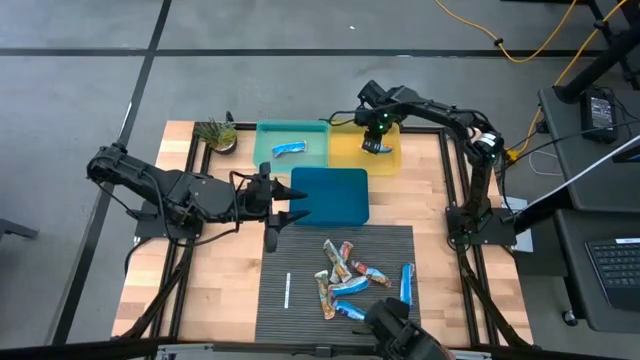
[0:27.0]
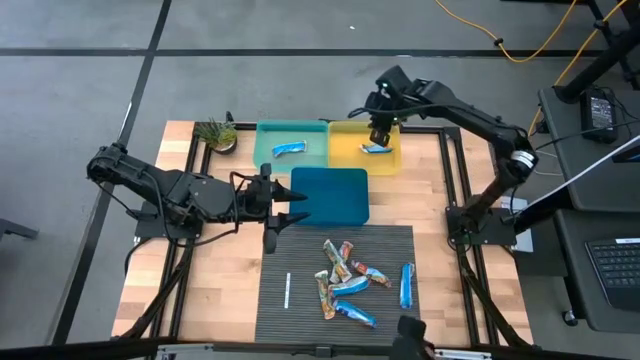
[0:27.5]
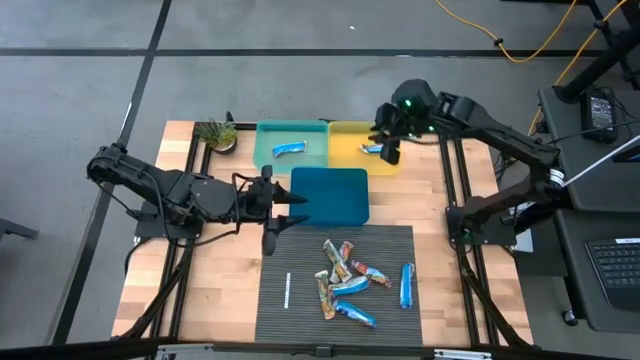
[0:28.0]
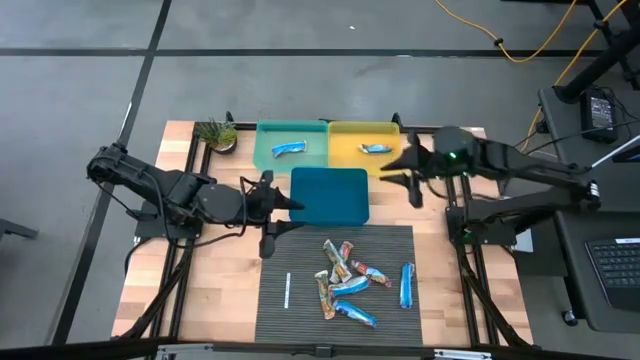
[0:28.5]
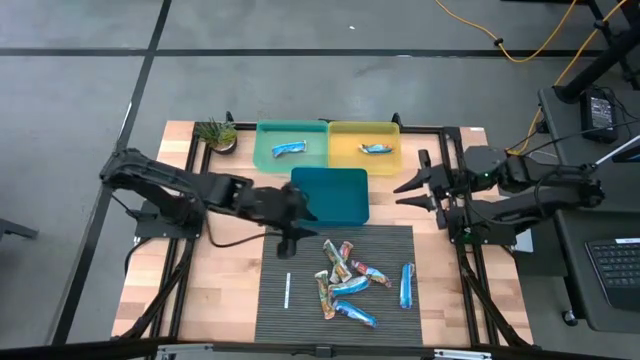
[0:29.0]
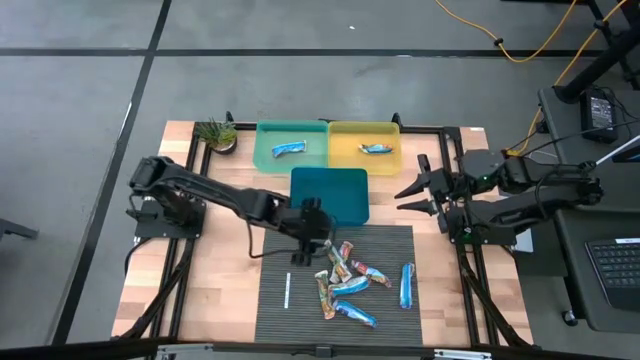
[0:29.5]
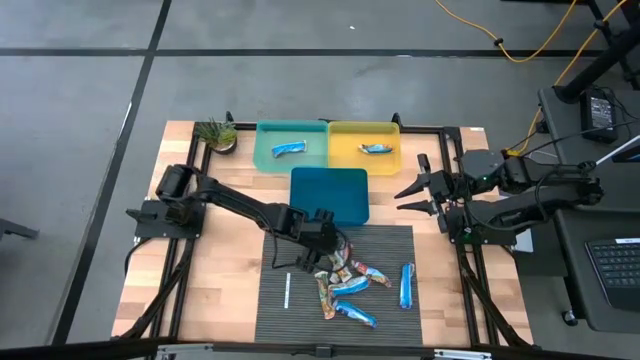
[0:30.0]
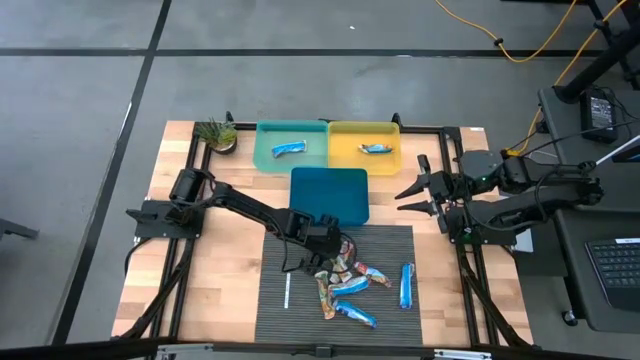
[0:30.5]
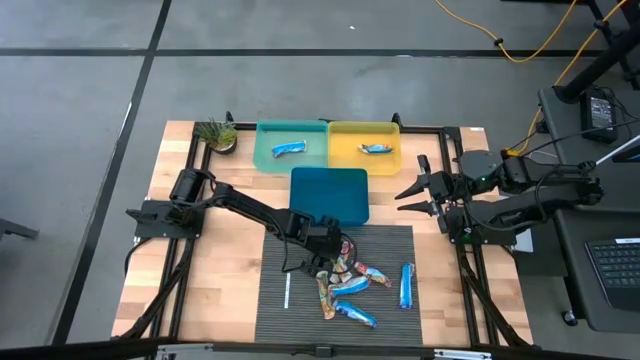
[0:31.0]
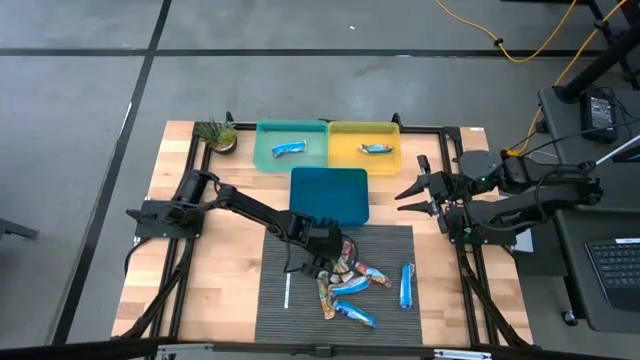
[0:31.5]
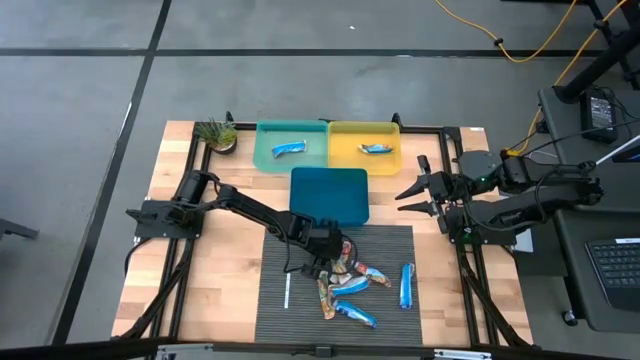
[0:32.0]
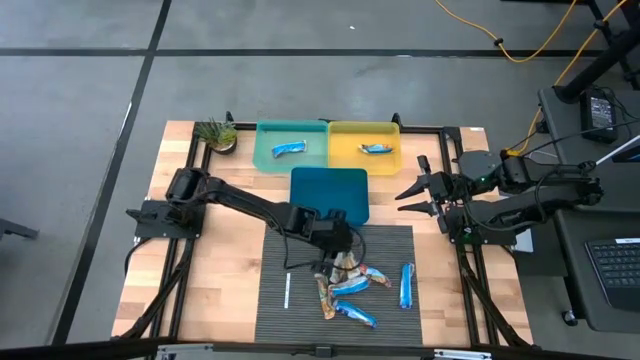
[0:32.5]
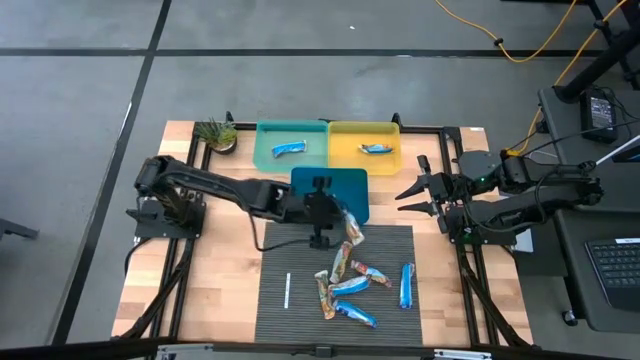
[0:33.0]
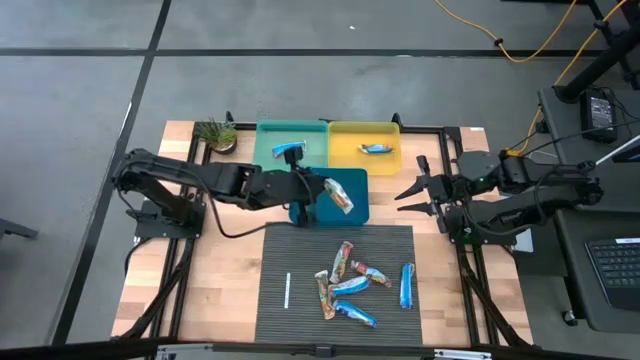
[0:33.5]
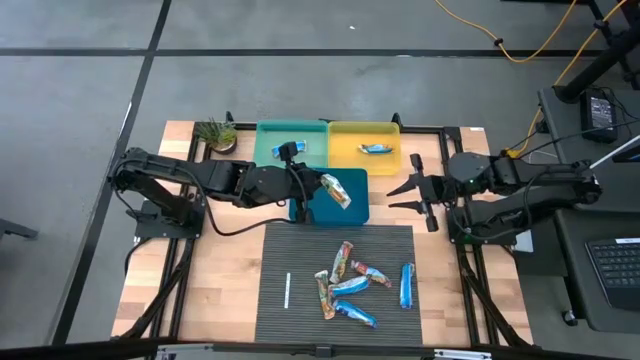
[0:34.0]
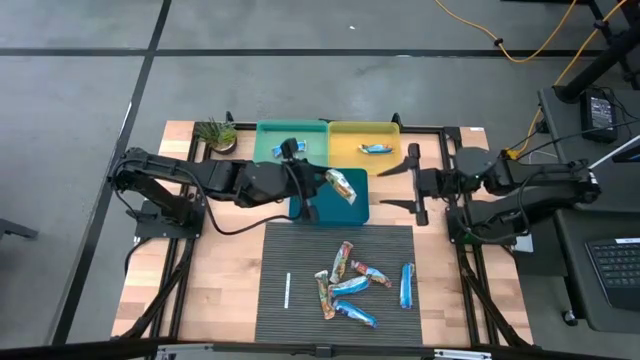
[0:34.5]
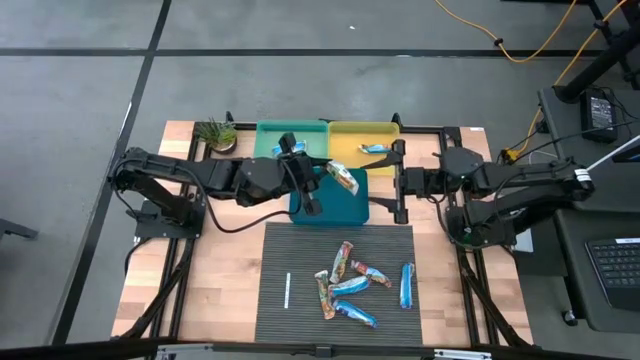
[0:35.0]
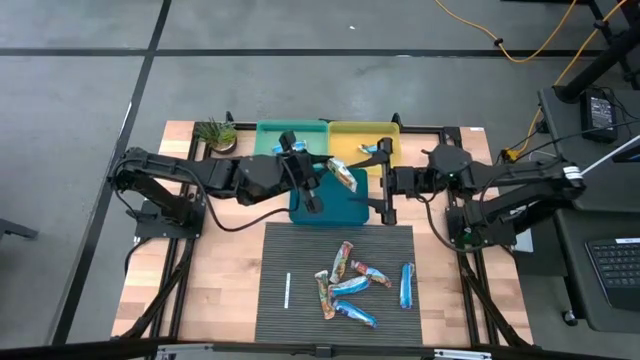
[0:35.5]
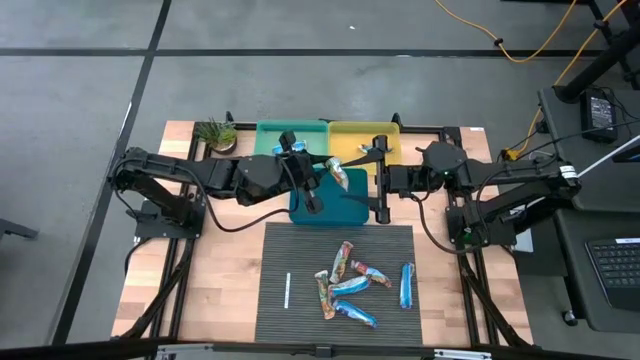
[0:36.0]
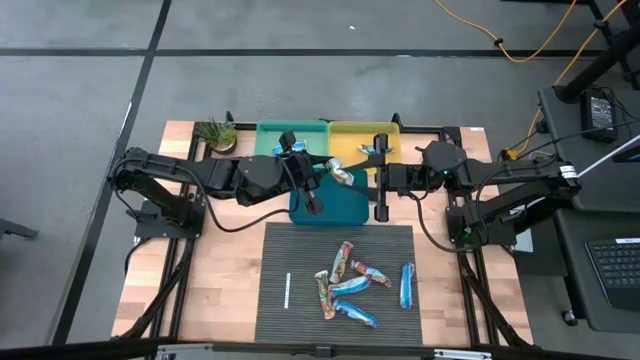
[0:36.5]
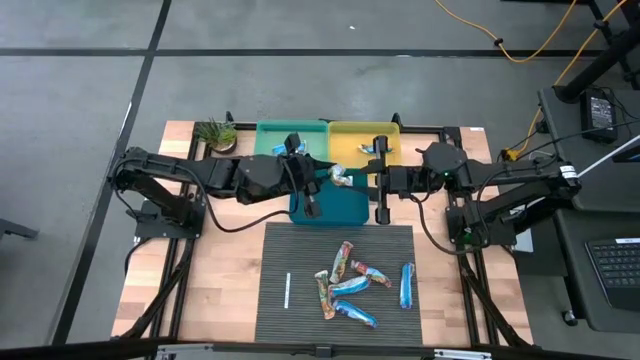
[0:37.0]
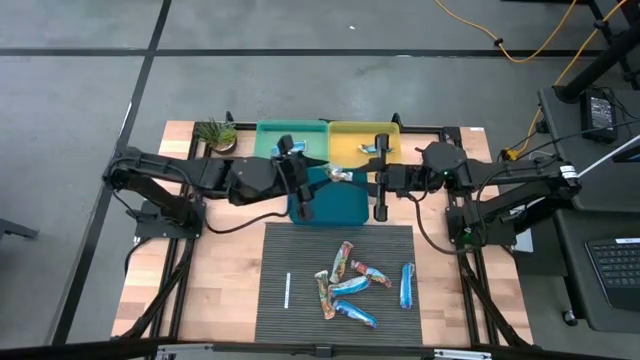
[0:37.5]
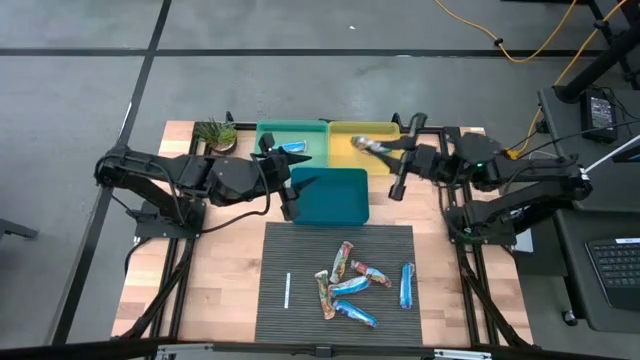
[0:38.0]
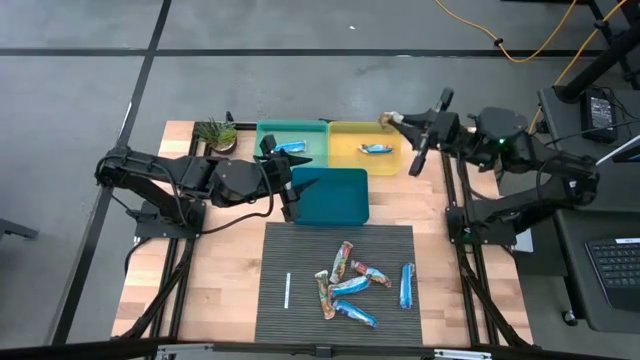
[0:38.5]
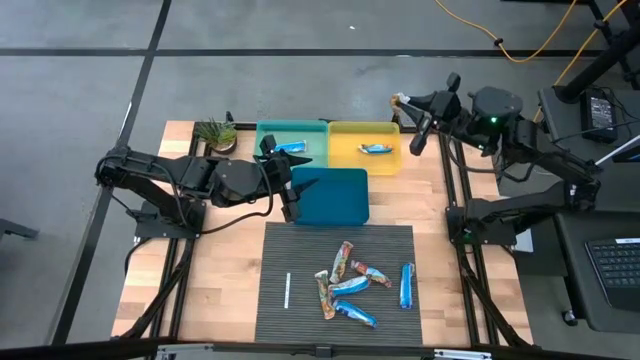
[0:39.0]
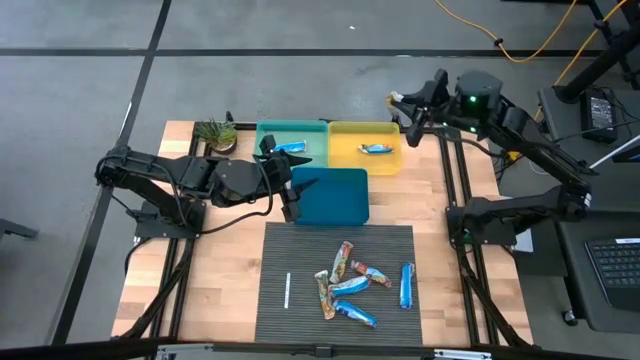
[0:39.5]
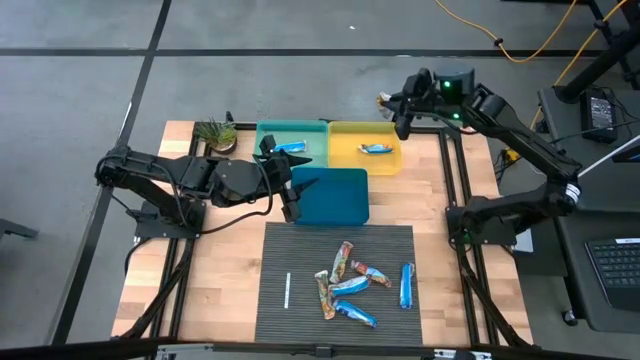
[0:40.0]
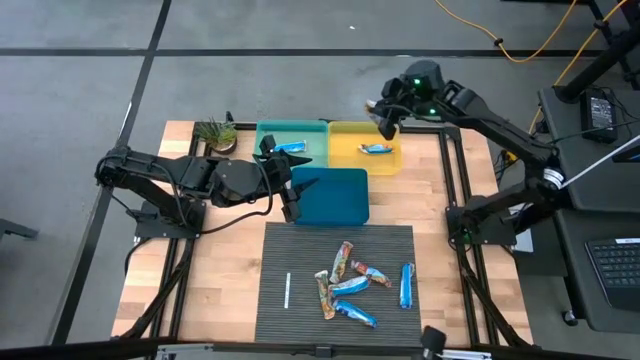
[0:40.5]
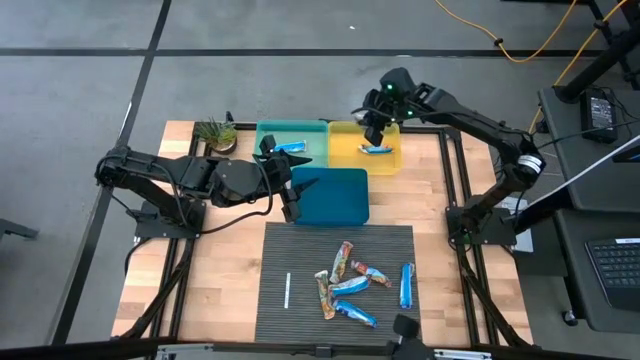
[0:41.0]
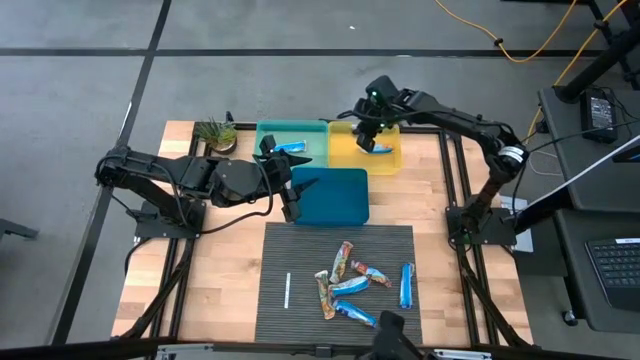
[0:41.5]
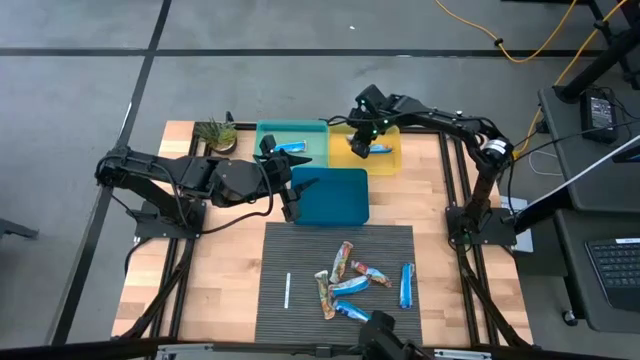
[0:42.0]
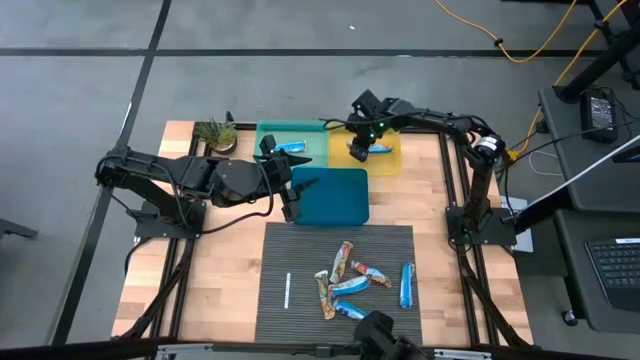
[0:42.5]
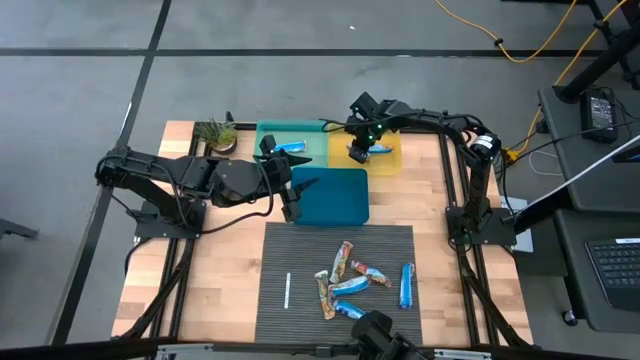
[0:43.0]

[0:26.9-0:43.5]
Task: Pick and place Granola Bars by type
Put the yellow granola bar into the yellow bin

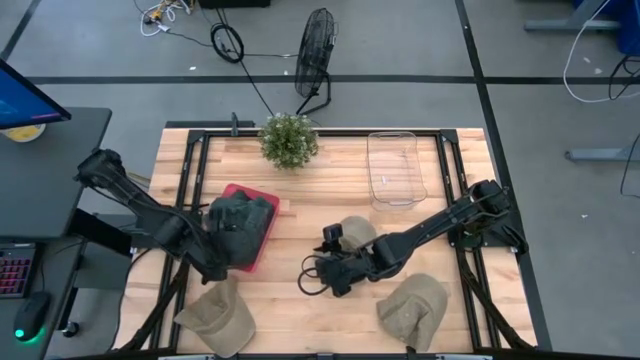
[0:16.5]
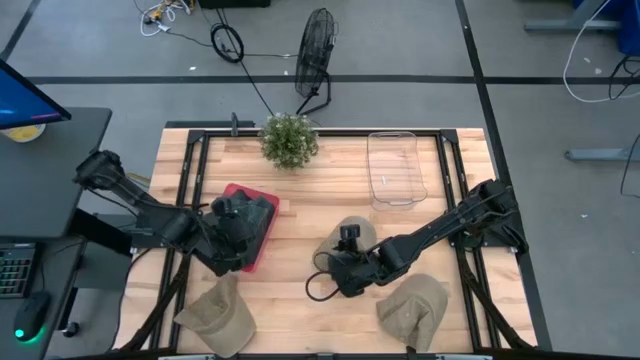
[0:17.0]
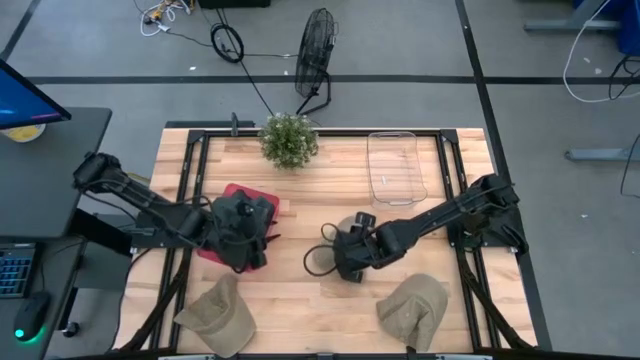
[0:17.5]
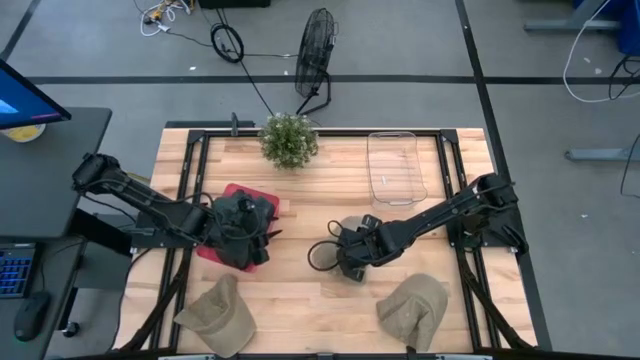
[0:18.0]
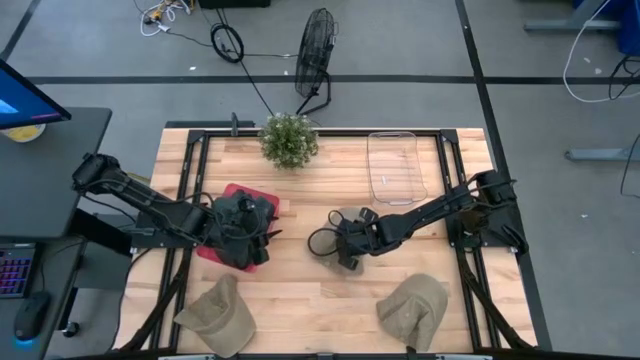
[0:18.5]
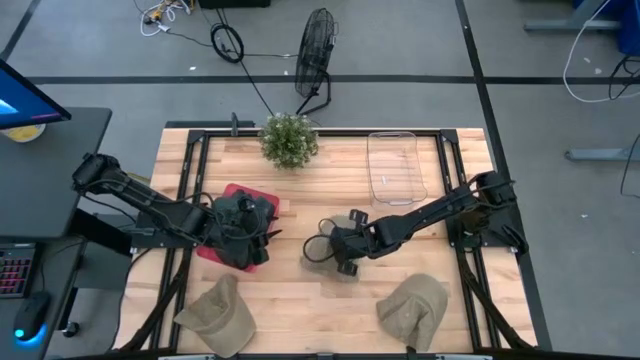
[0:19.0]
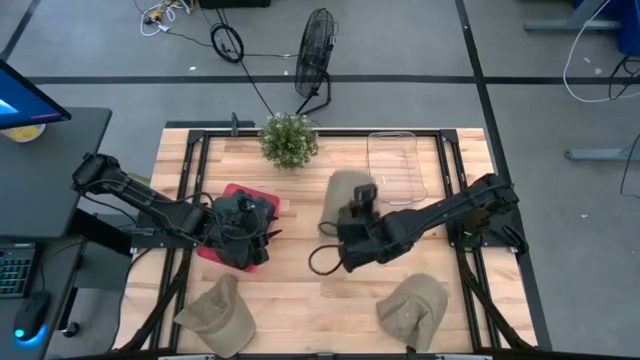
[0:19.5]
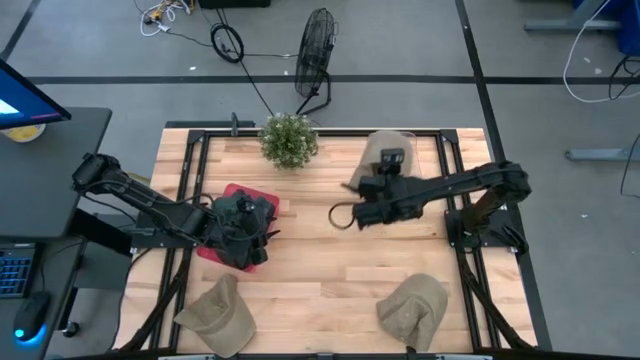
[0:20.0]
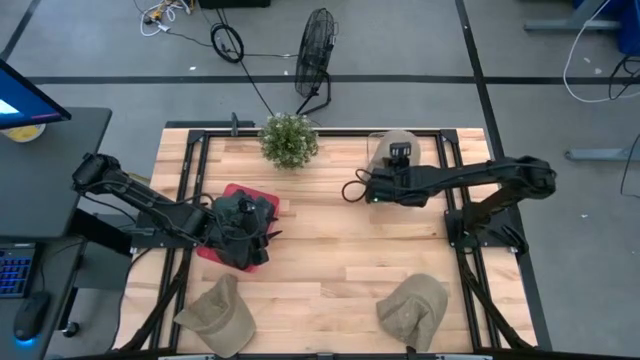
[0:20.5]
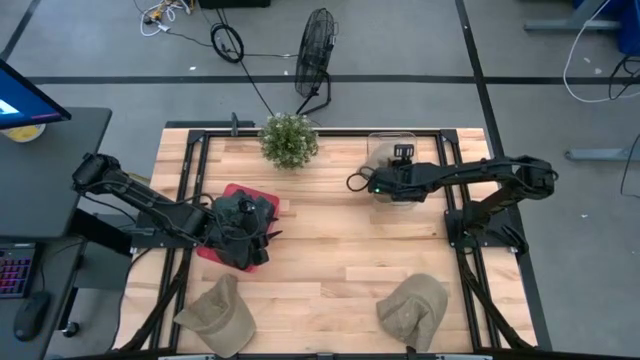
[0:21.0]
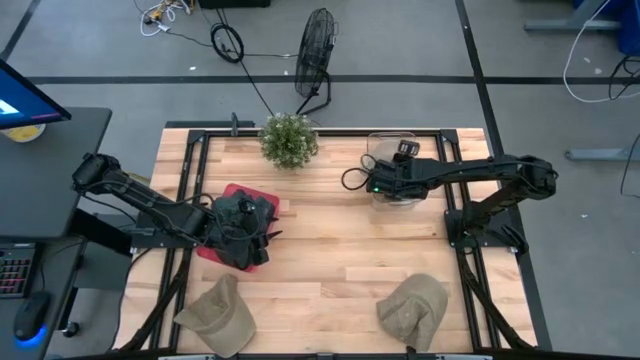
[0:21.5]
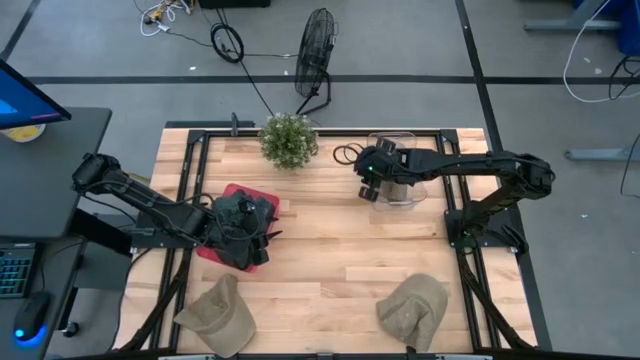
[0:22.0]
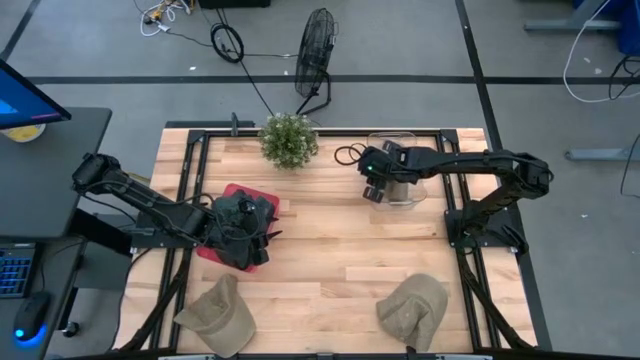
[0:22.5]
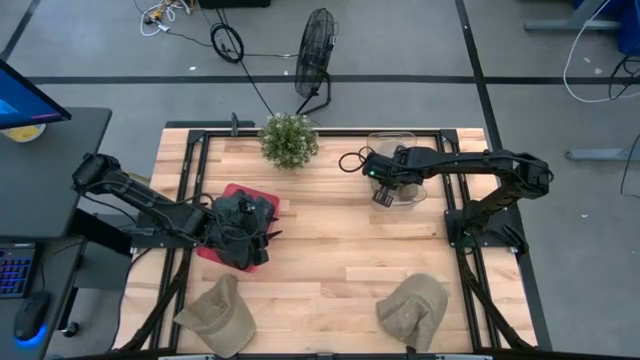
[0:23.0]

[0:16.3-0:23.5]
Task: Pick & Place hat
Put the top brown cap into the transparent bin
